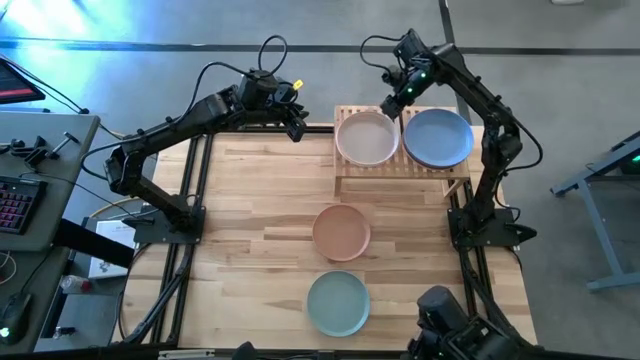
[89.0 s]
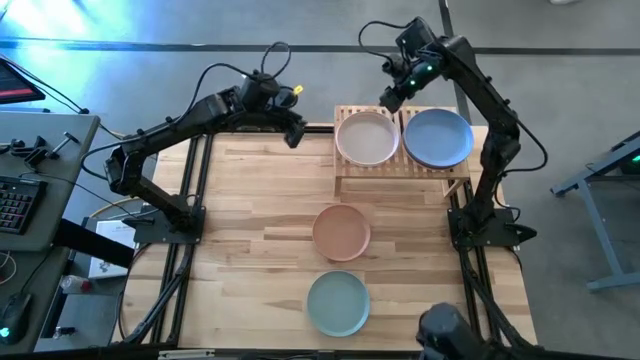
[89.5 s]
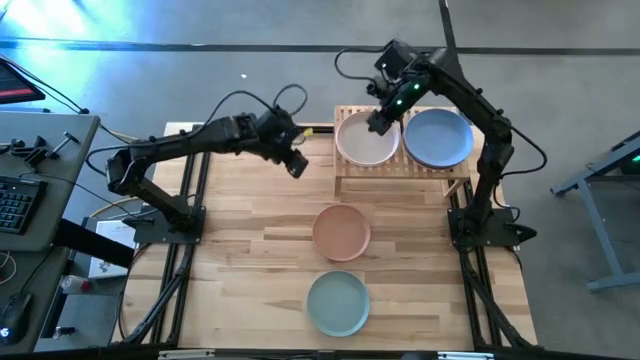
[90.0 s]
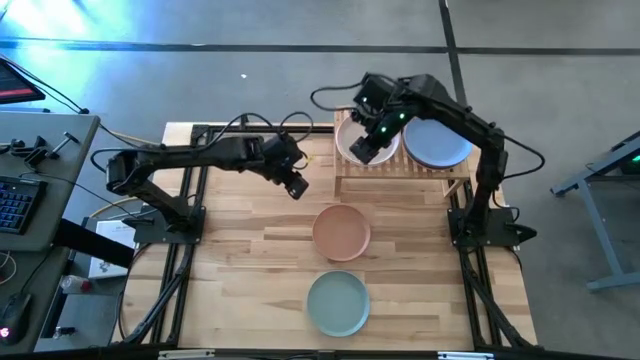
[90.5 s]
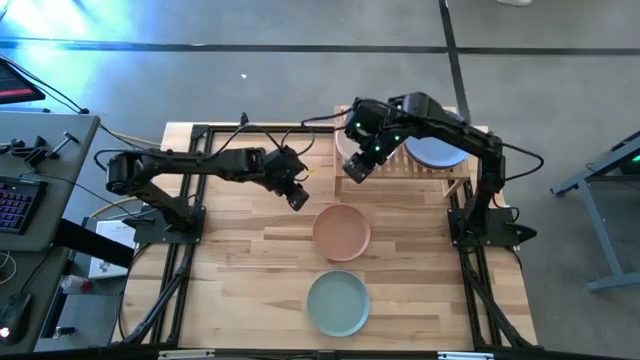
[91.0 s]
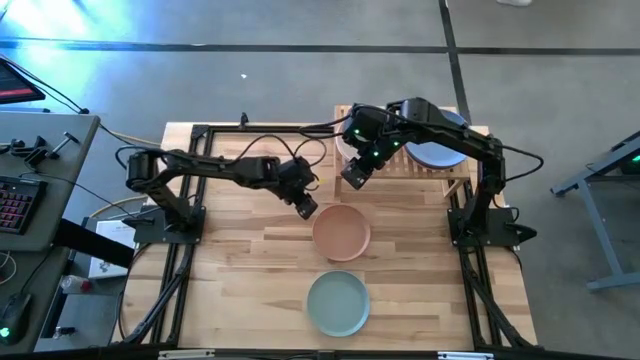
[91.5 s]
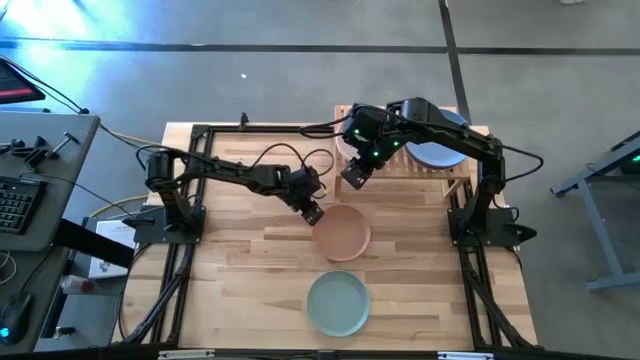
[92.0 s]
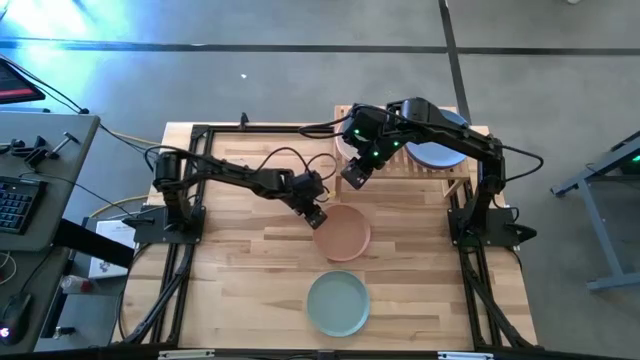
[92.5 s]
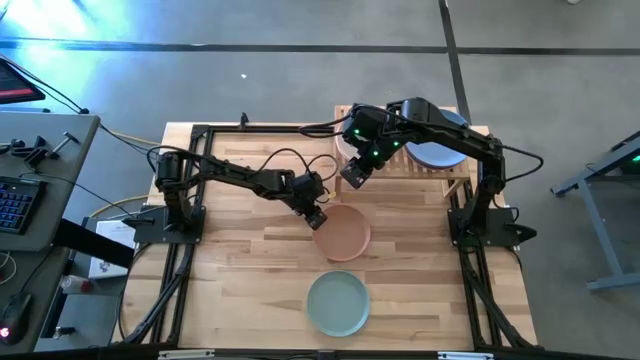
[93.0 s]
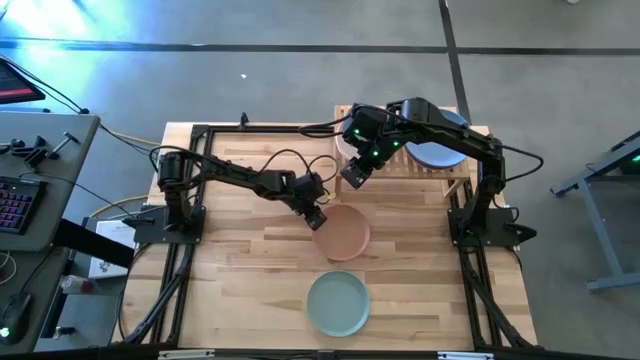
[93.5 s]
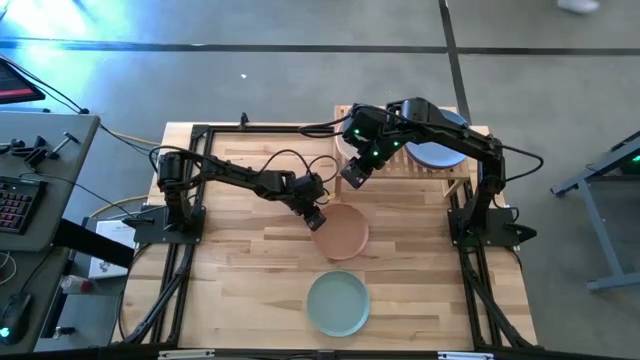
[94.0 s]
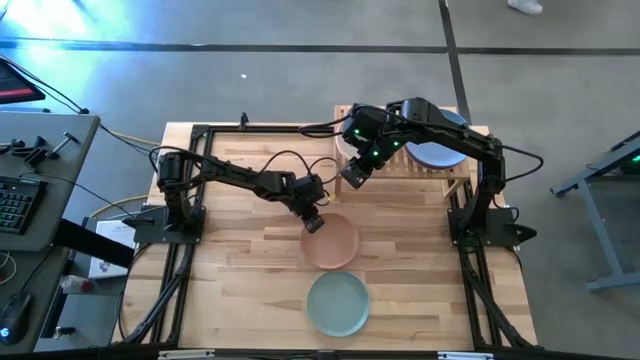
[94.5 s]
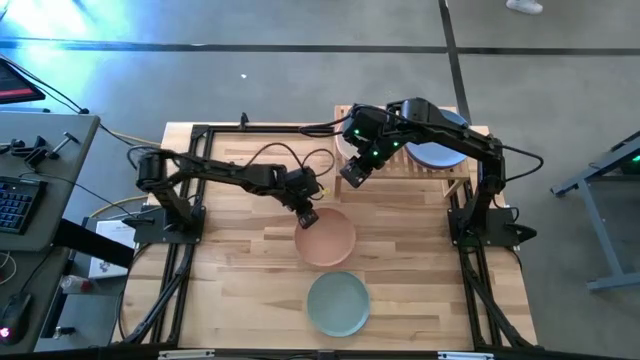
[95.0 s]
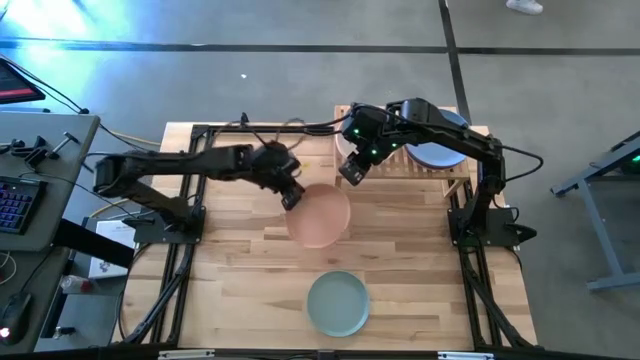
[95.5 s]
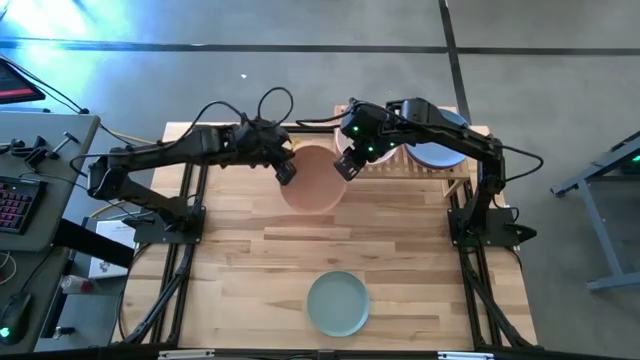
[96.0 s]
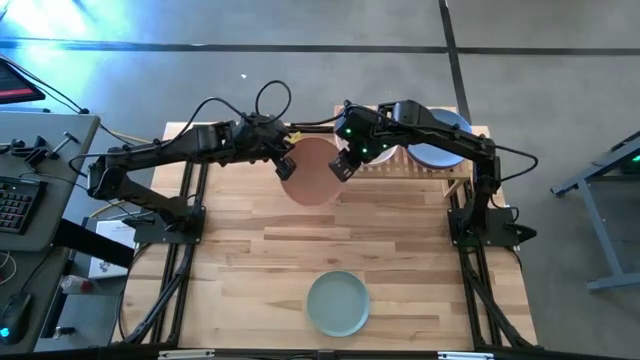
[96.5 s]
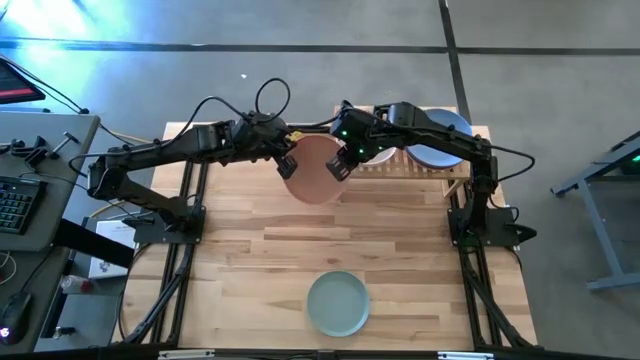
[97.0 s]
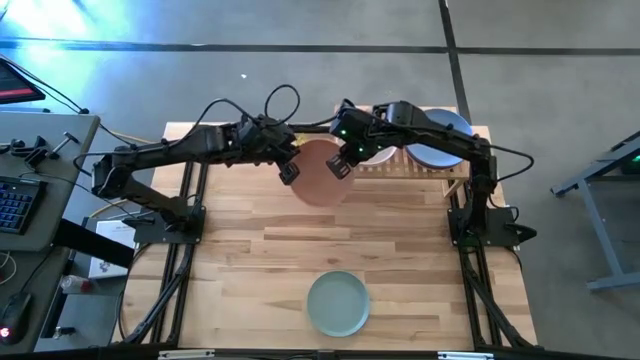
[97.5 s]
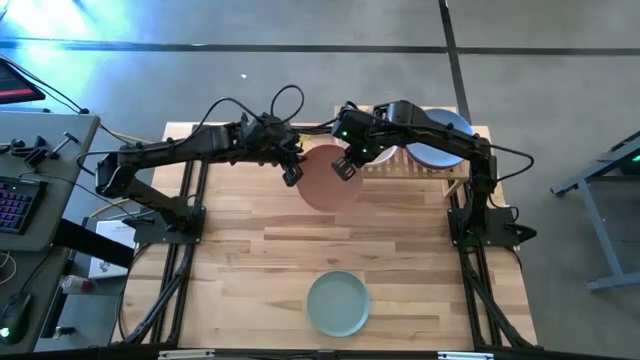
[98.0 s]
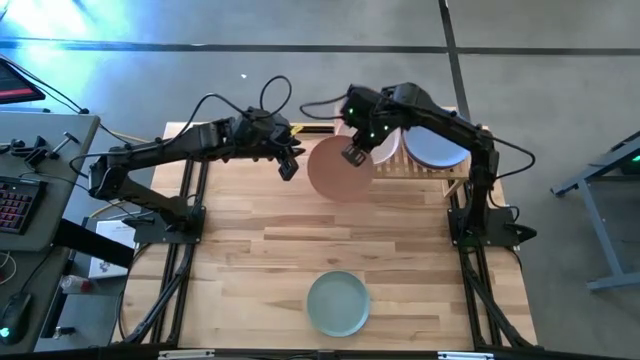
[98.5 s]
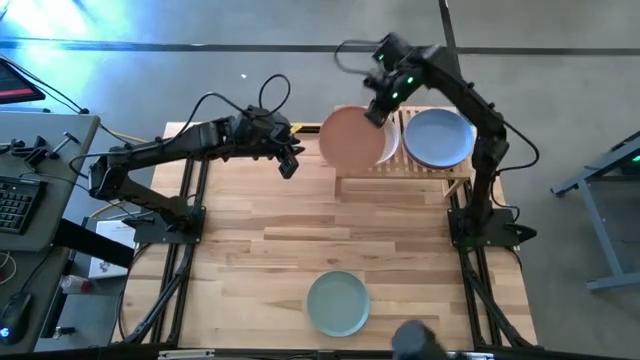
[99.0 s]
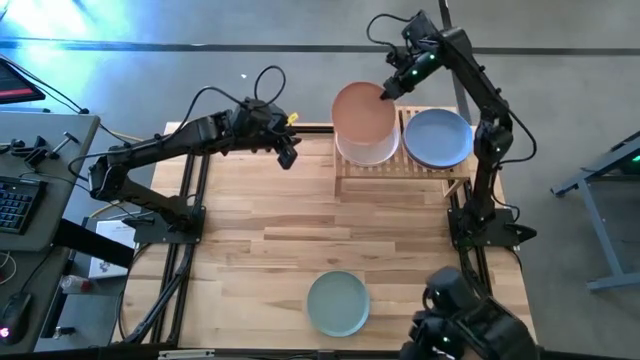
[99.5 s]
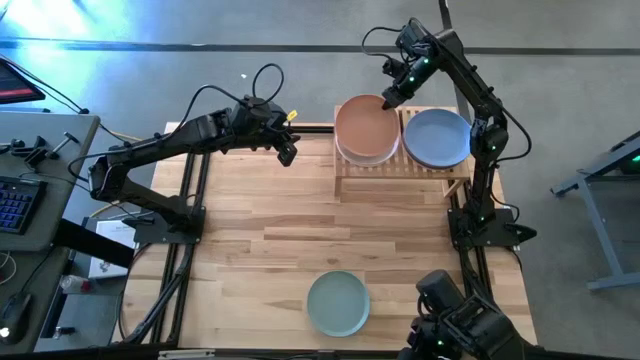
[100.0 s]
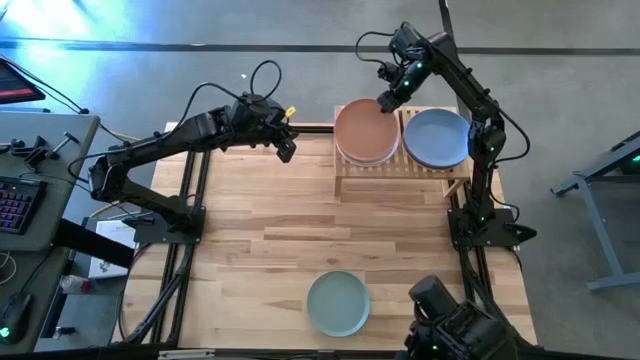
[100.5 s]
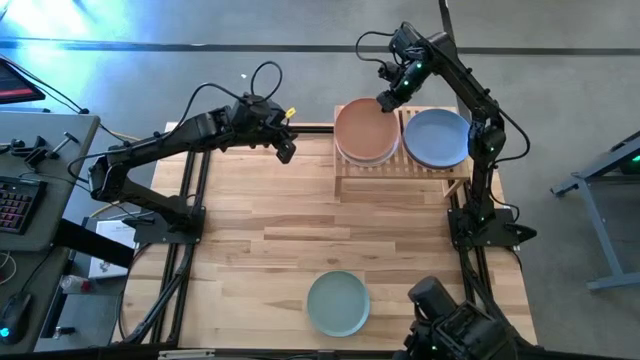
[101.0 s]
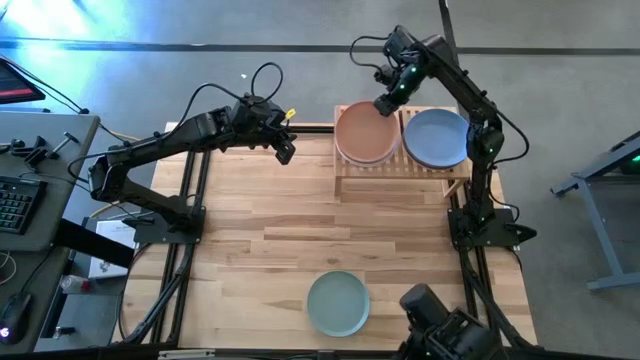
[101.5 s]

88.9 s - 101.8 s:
Task: Place and stack plates onto a shelf
Stack the beige plate on top of the white plate on the shelf

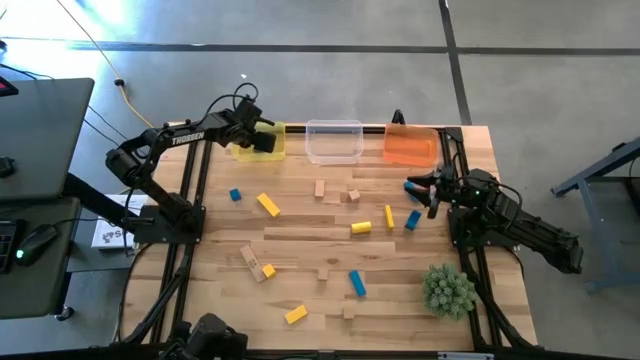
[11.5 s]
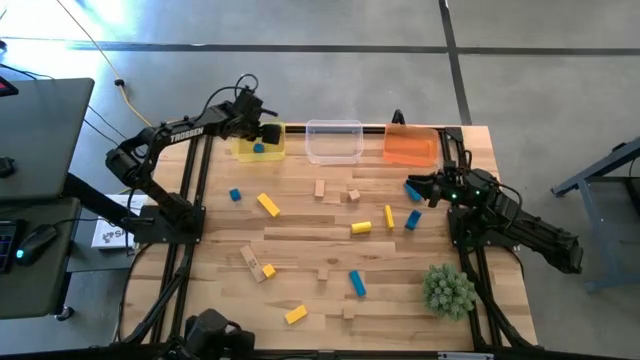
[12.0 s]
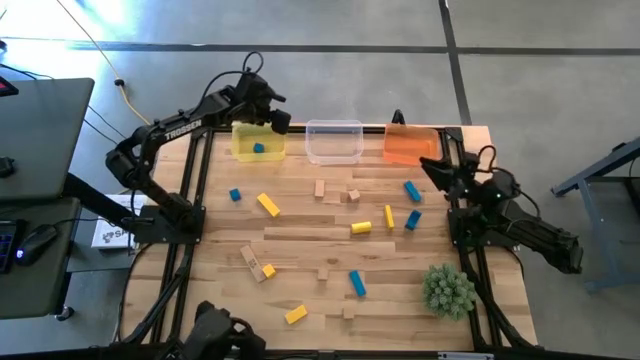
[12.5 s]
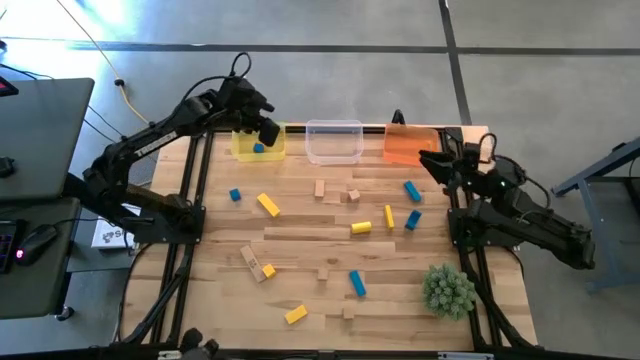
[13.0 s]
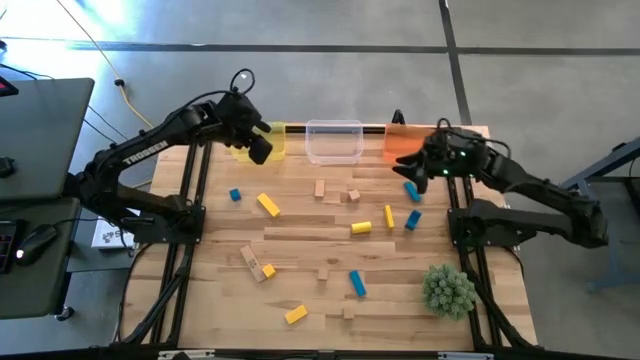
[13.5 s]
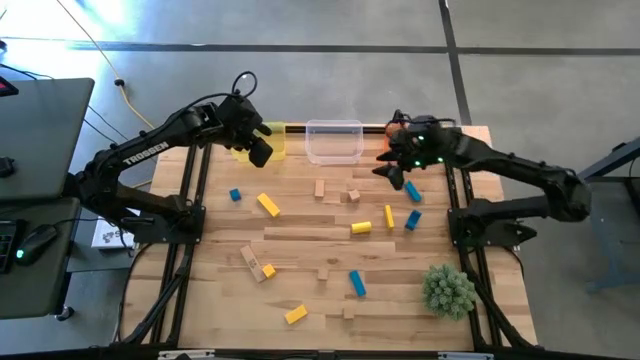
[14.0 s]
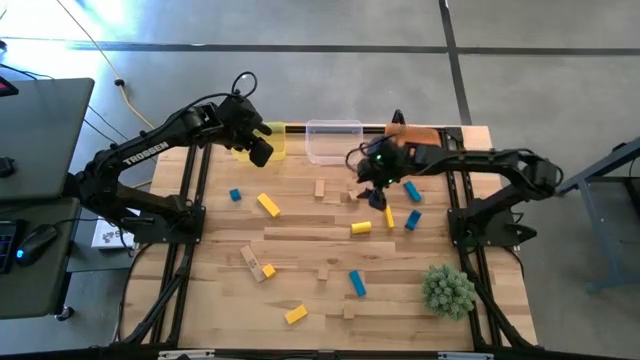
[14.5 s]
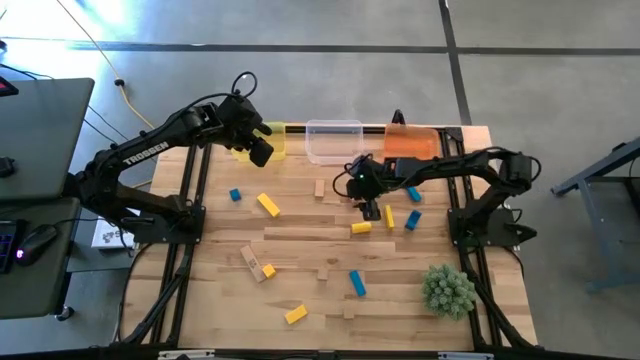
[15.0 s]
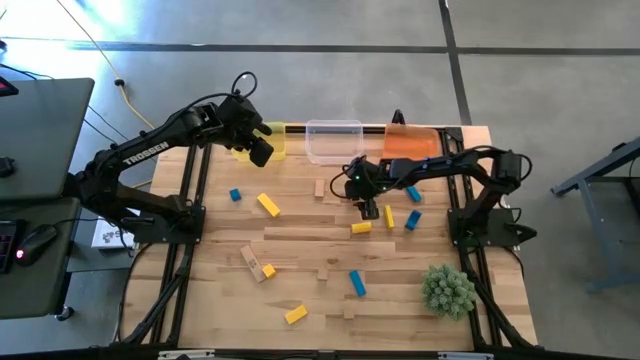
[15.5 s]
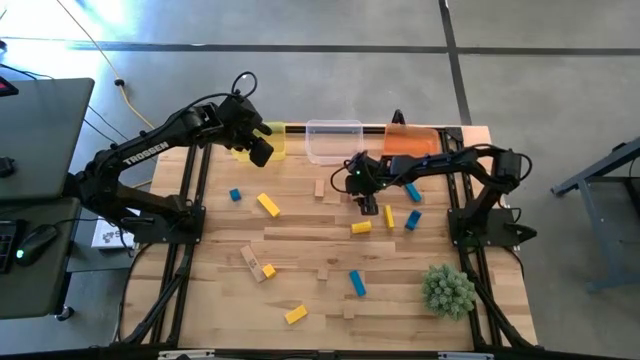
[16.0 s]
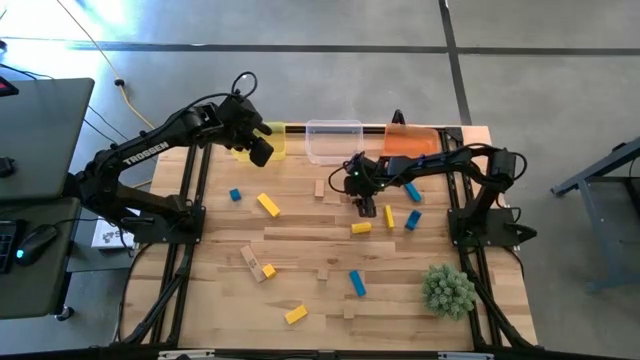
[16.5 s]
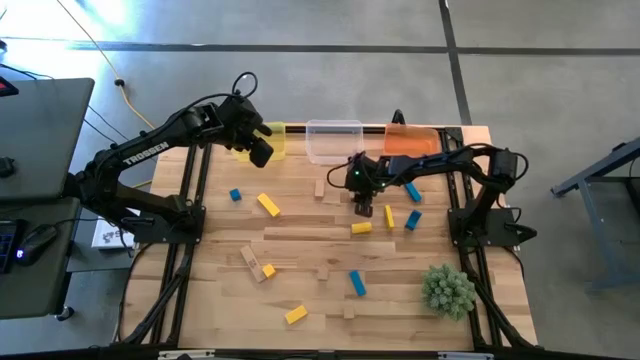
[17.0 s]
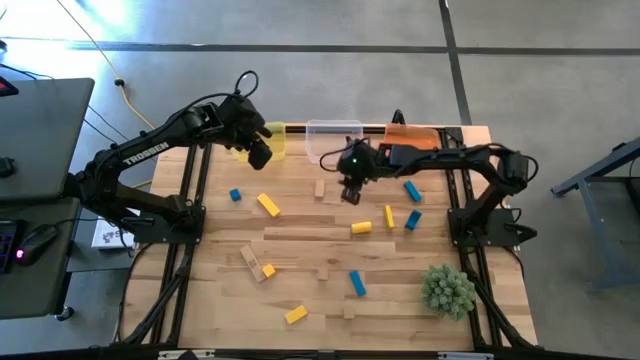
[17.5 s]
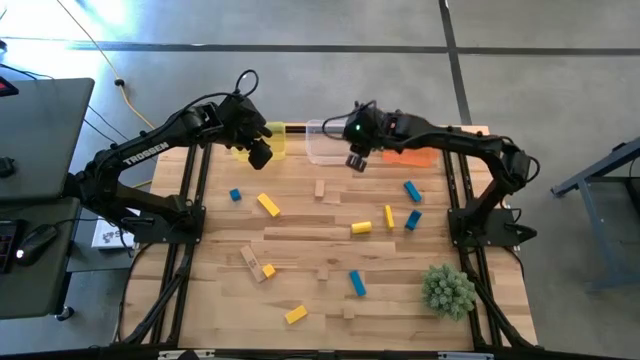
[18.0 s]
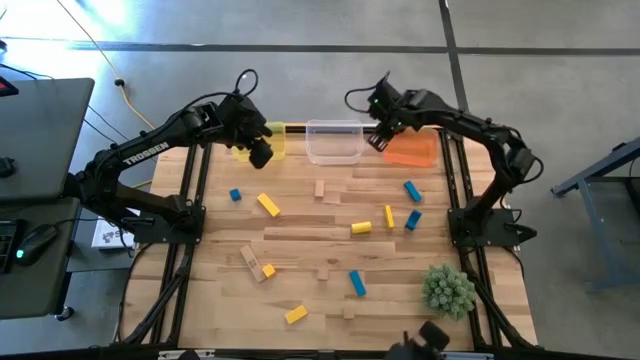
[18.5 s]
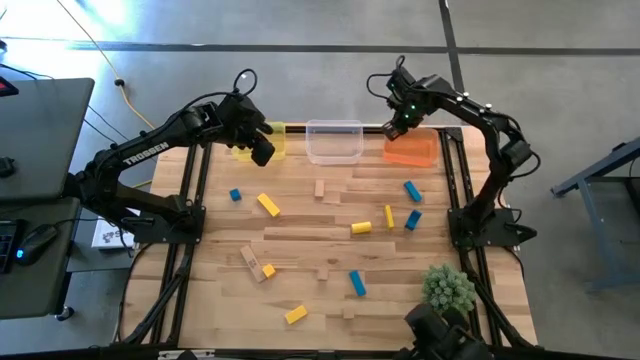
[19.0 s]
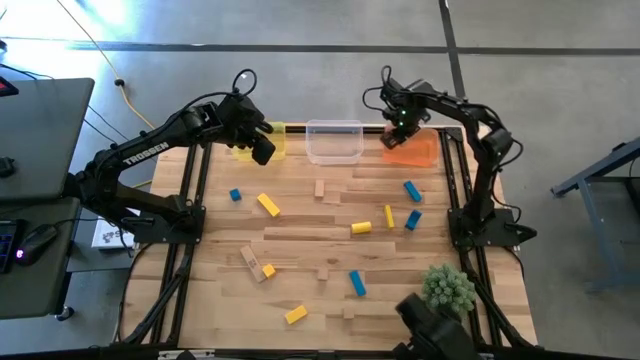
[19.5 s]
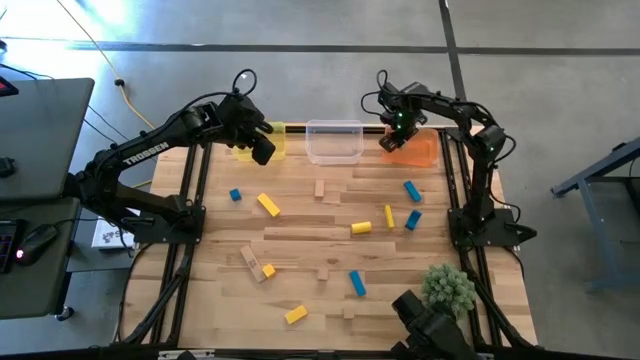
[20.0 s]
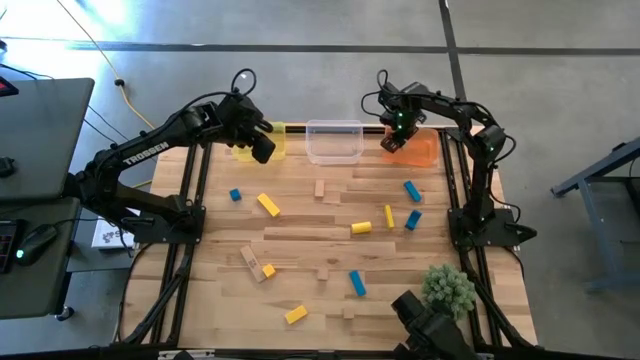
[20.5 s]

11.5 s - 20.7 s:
Task: Sort & place blocks by color
Put the brown block into the orange bin
